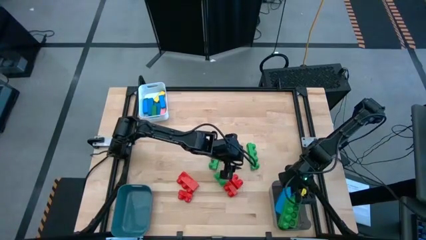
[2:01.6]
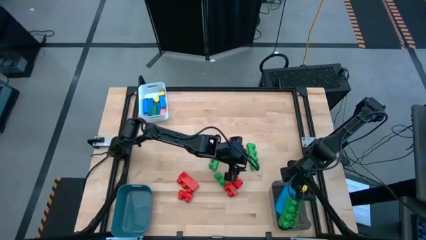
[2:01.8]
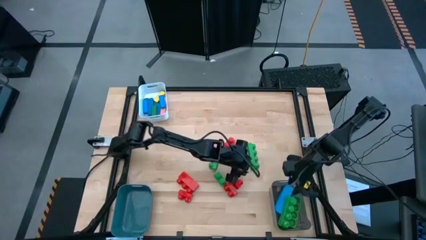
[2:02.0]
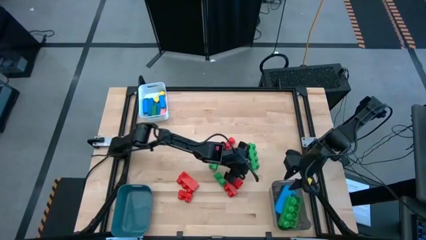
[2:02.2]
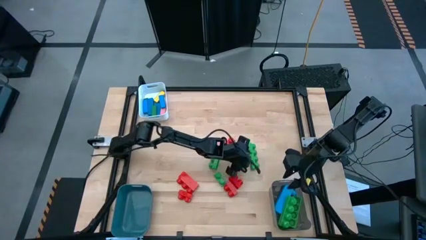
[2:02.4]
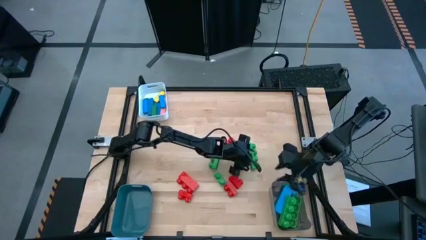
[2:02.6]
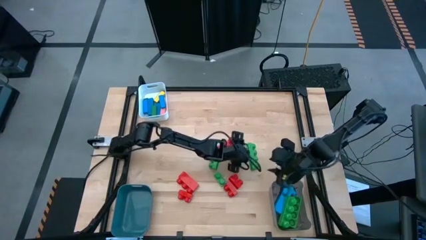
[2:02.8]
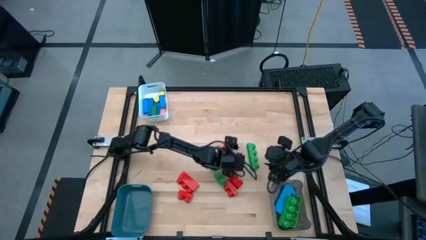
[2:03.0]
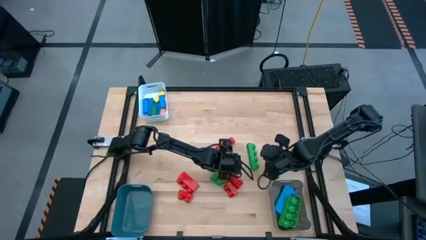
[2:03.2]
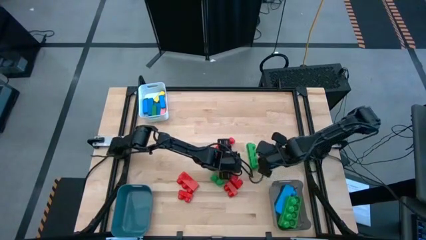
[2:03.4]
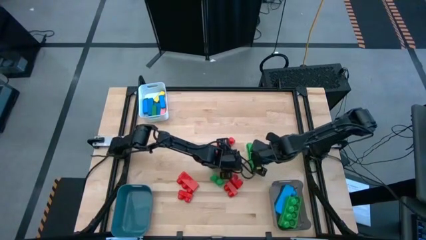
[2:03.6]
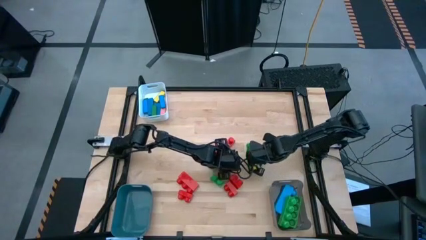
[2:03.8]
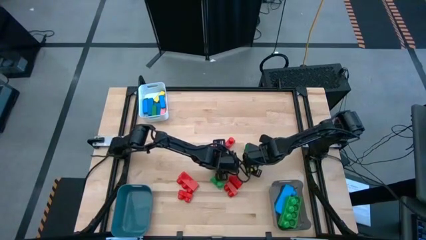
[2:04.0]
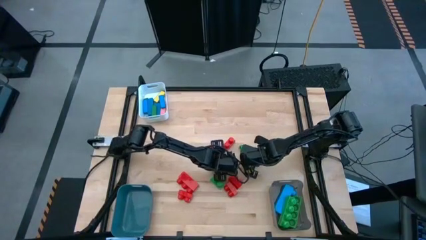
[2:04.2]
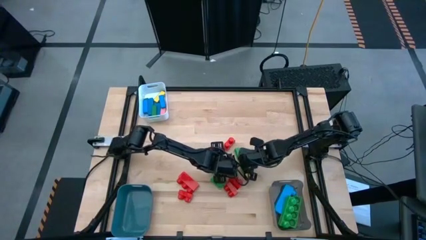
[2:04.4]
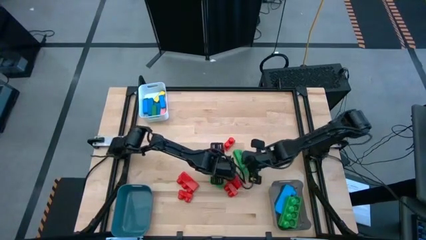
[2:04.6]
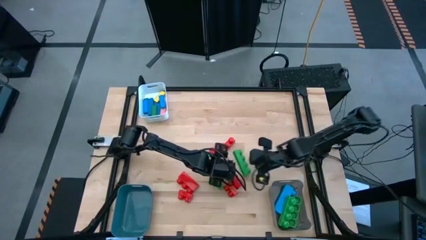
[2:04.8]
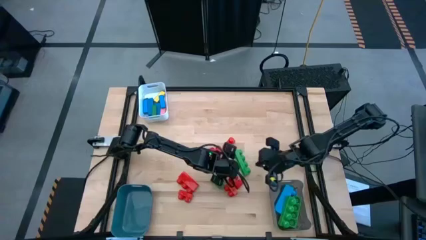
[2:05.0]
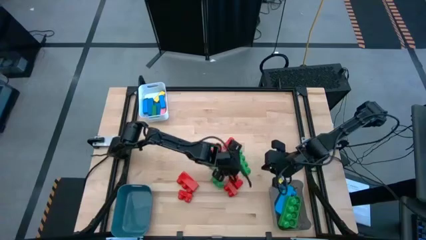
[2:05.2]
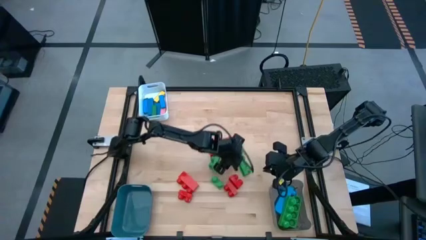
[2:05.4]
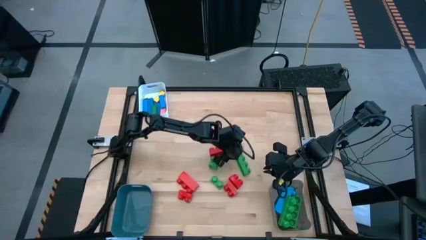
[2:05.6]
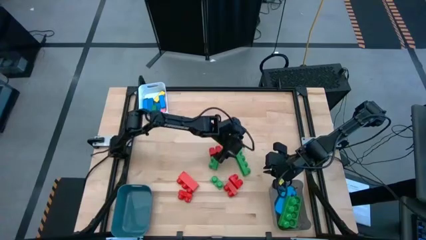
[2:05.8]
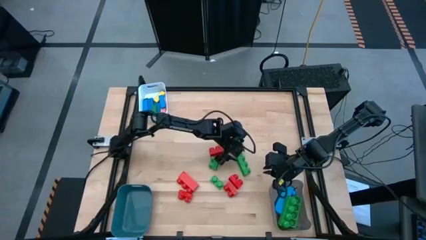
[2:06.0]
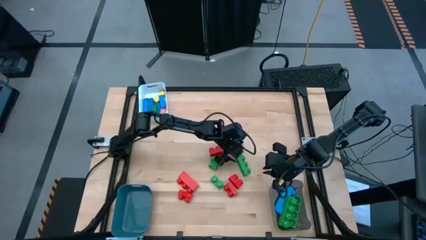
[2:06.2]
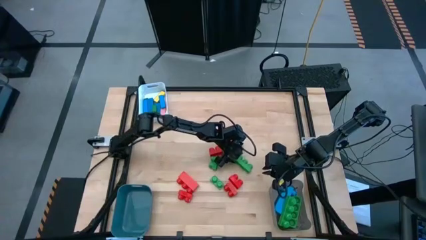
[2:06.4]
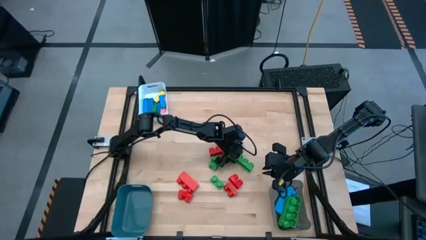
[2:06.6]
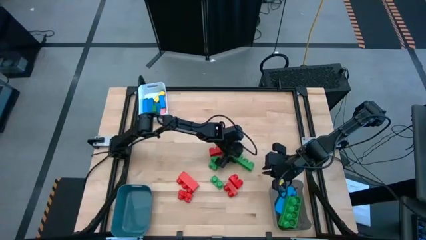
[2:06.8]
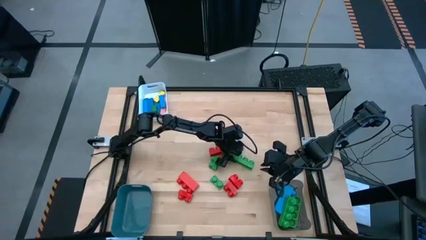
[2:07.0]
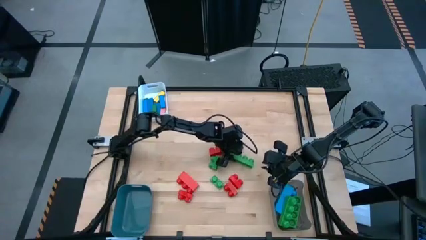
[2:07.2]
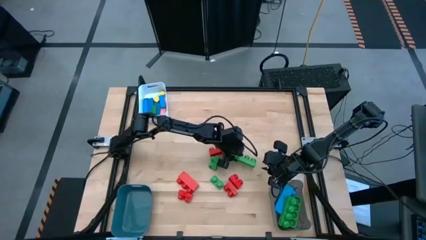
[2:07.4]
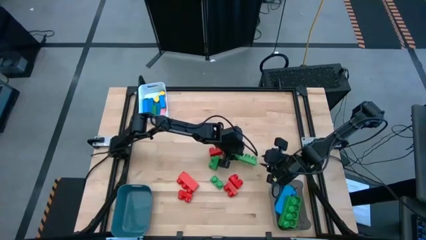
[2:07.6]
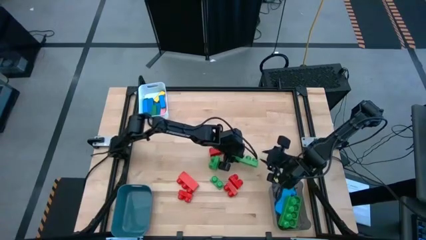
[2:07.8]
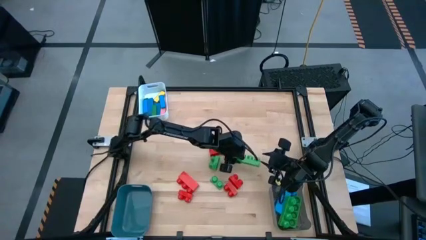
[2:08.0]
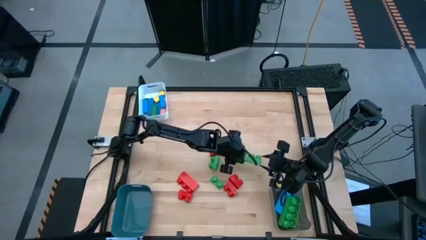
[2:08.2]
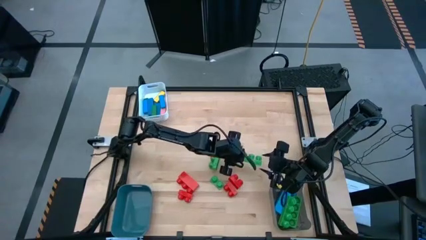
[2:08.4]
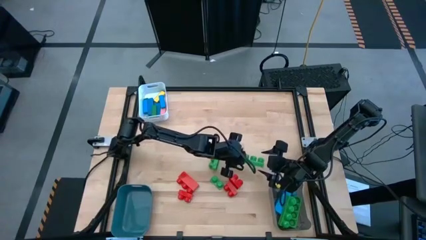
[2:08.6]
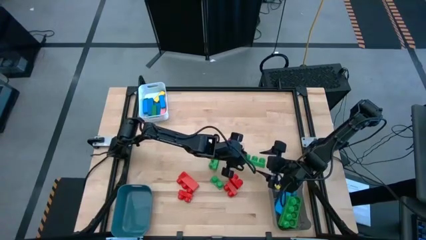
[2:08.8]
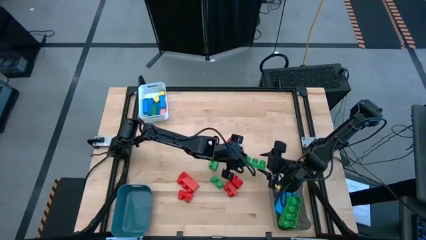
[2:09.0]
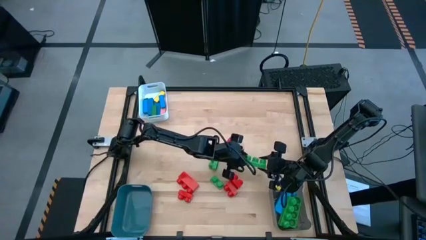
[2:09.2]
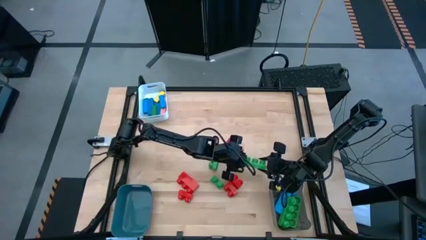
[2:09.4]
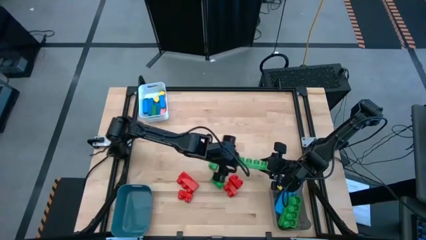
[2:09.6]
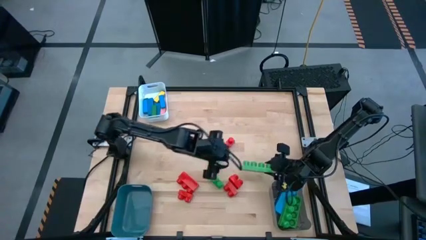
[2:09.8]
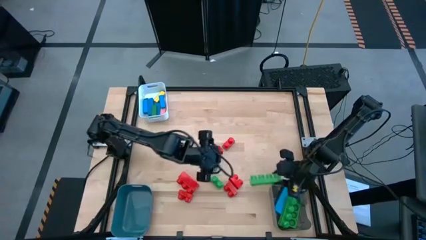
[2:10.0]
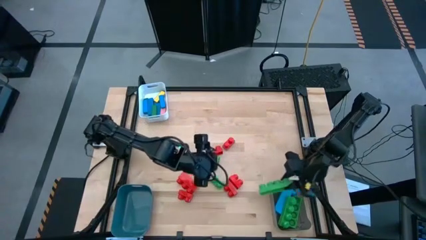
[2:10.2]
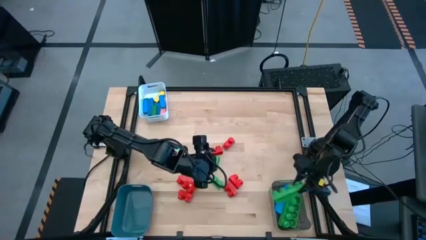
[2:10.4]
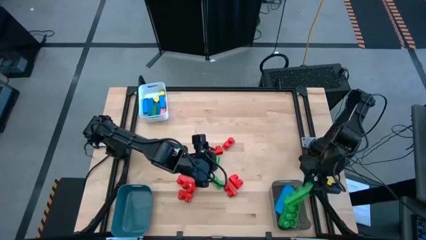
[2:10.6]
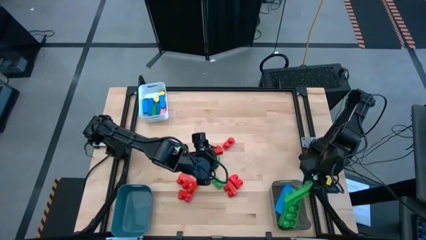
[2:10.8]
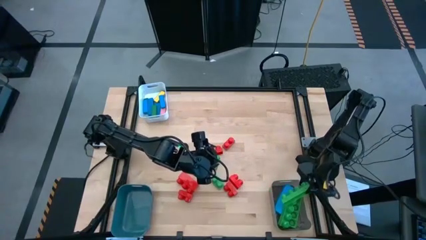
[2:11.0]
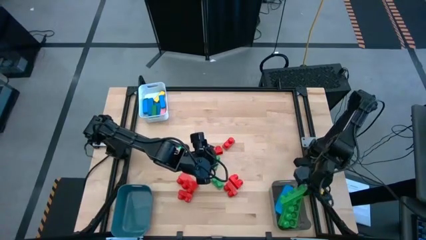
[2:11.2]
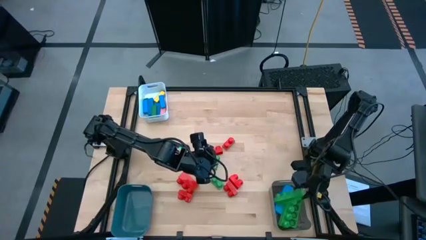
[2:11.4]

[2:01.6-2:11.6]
Task: Sort blocks by size
Put the green 4 stud gamepiece into the black bin

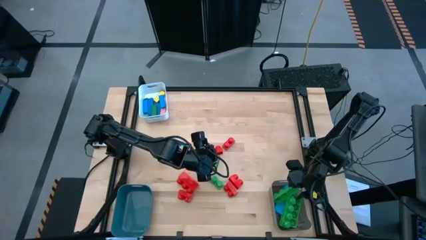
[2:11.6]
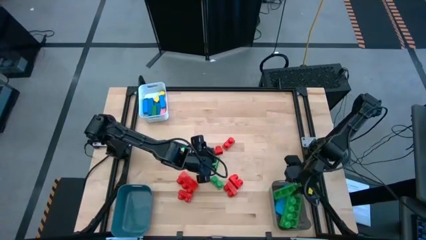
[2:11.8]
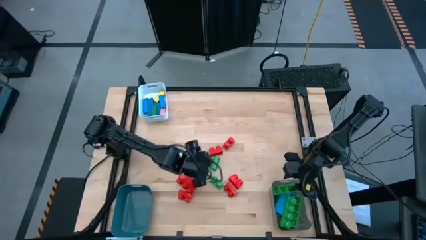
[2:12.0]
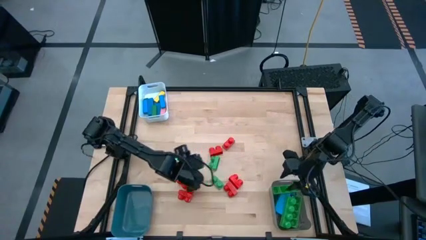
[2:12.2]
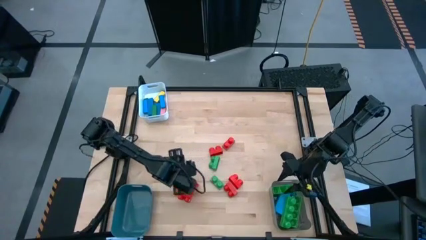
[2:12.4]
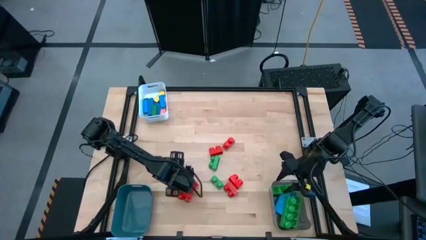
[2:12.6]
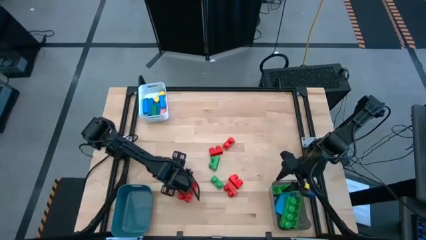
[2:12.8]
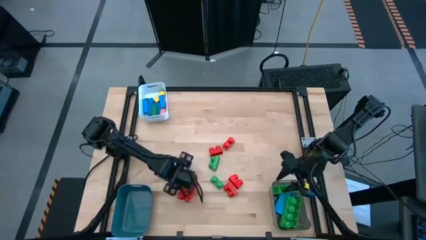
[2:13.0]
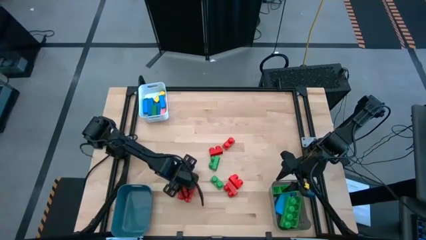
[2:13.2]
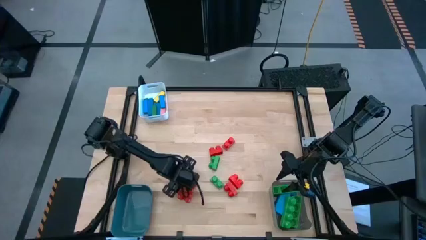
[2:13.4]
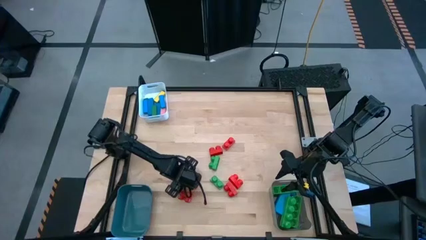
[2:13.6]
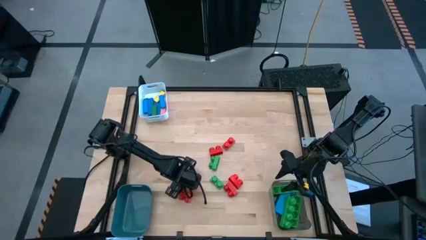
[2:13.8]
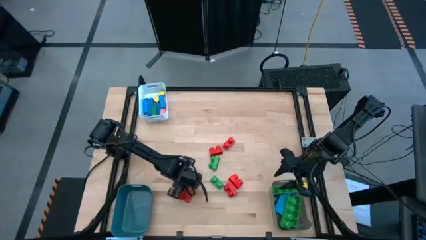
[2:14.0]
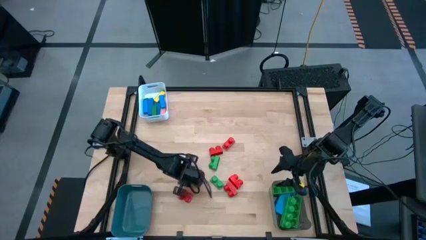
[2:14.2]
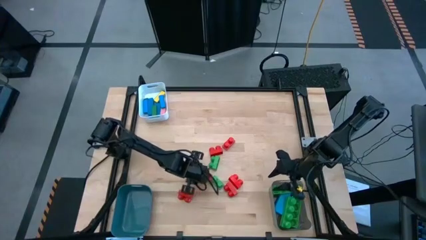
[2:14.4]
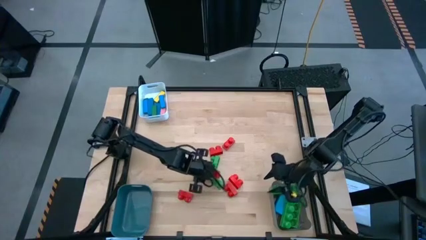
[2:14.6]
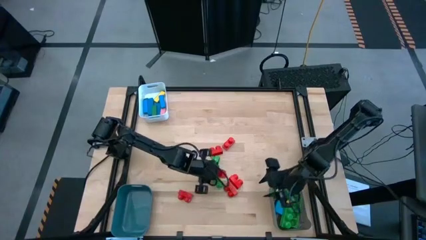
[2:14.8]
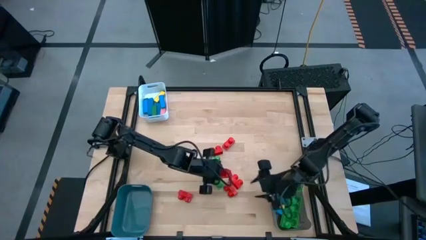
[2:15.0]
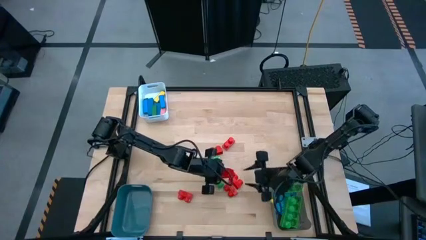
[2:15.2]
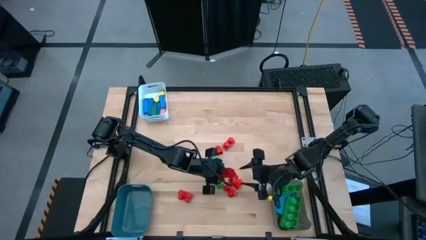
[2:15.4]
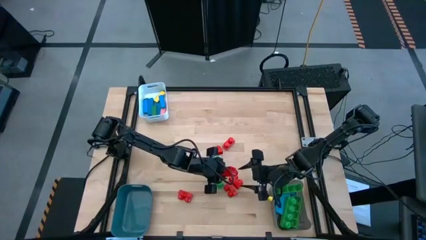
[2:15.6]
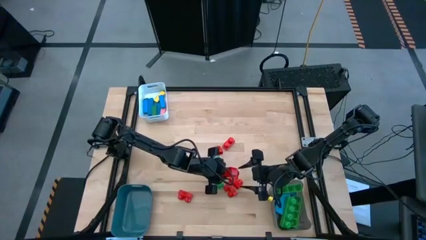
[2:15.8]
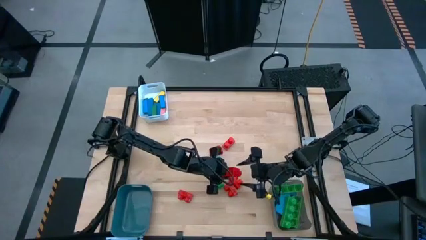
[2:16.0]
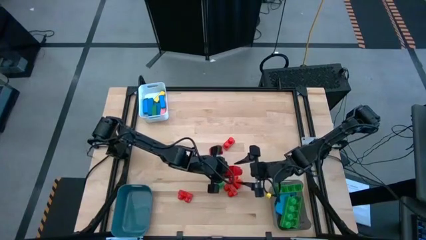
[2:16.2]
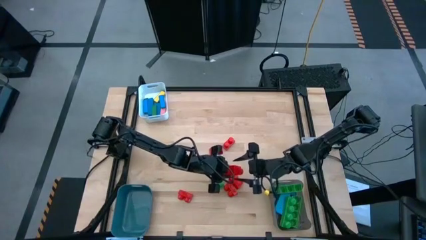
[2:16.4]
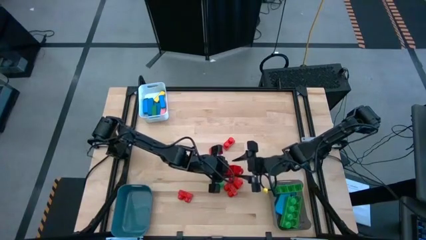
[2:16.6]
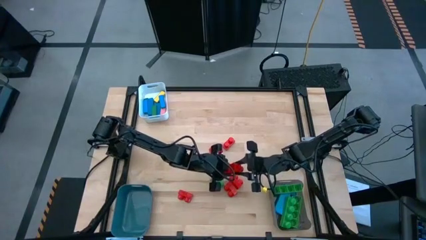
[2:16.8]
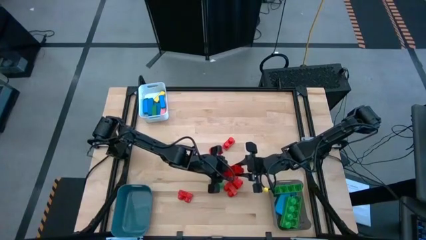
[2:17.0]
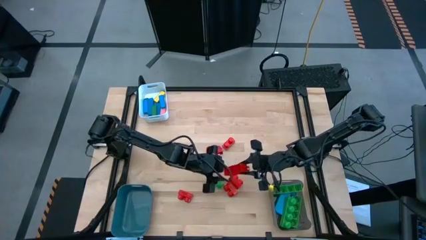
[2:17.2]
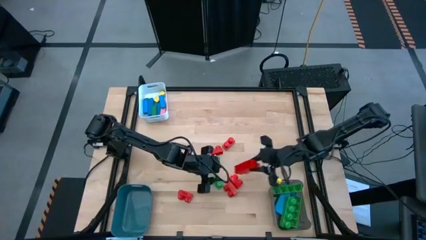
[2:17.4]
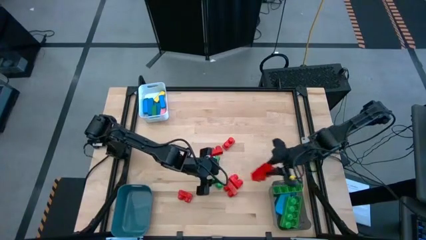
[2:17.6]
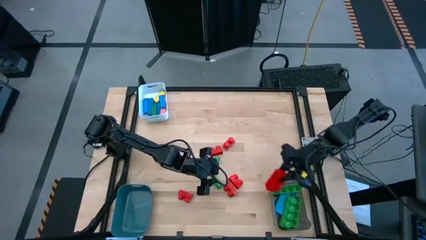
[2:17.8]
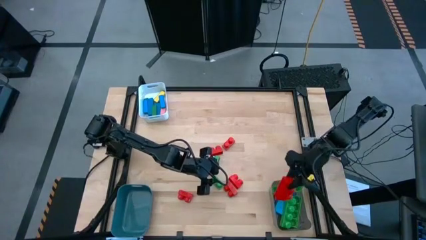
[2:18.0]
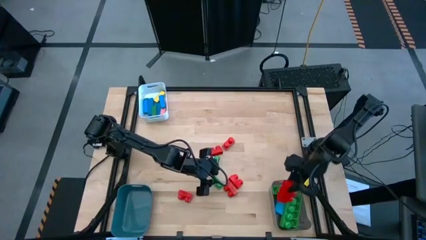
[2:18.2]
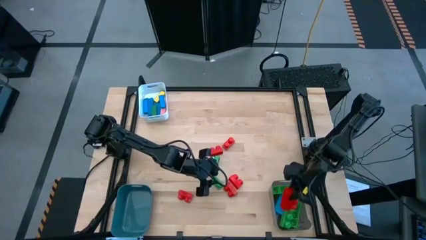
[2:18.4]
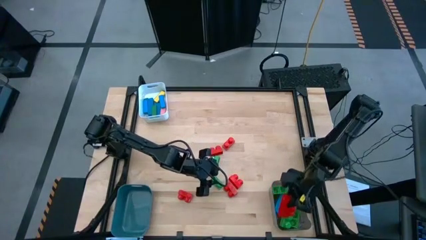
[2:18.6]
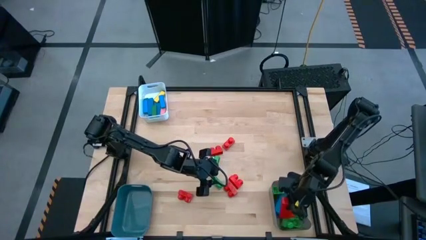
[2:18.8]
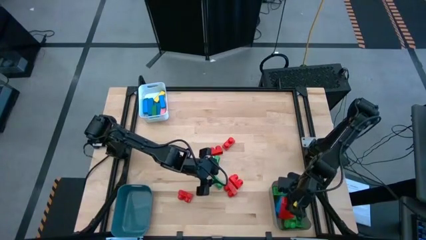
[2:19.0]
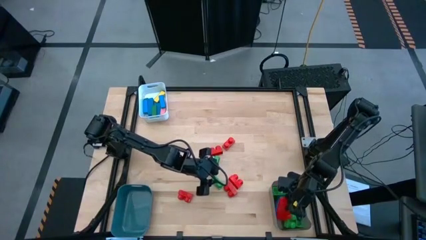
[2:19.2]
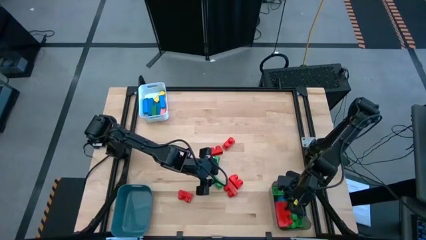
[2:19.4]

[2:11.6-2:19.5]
Put the red 3 stud gamepiece into the black bin
